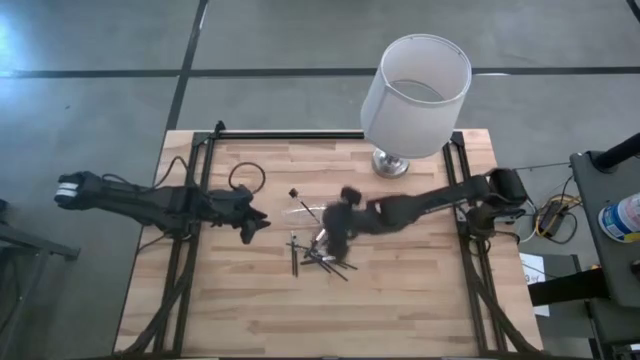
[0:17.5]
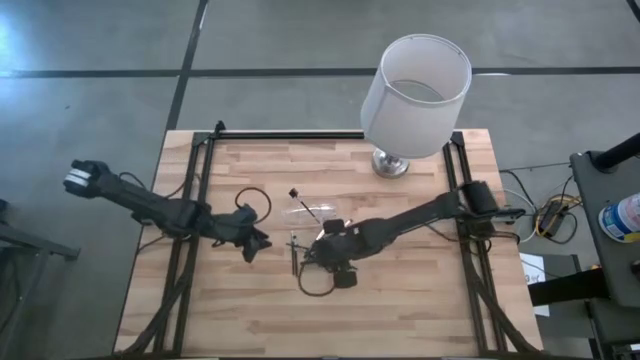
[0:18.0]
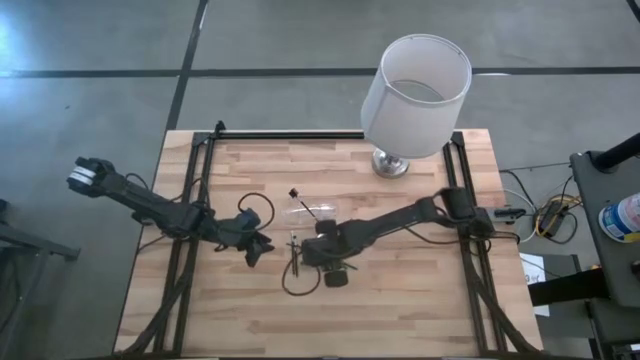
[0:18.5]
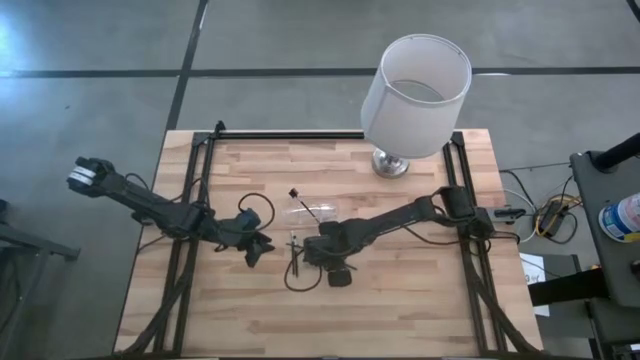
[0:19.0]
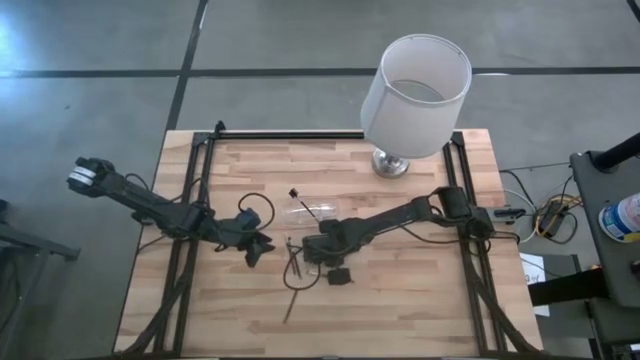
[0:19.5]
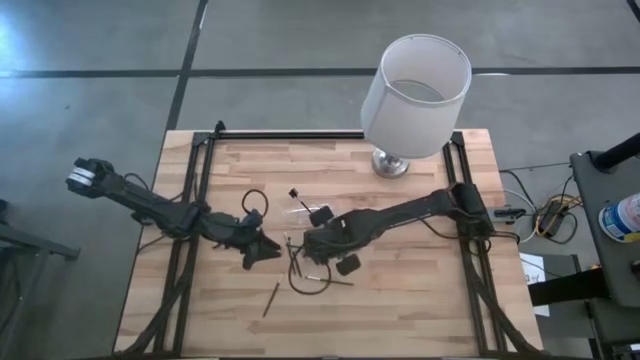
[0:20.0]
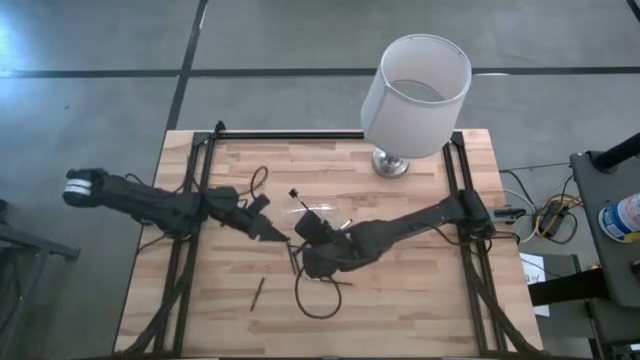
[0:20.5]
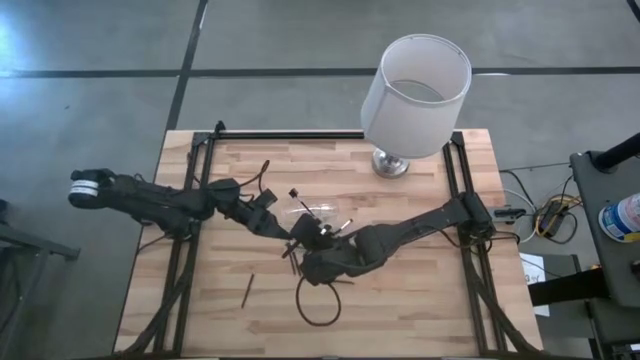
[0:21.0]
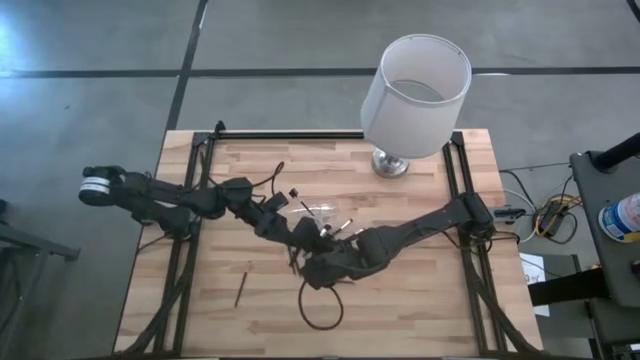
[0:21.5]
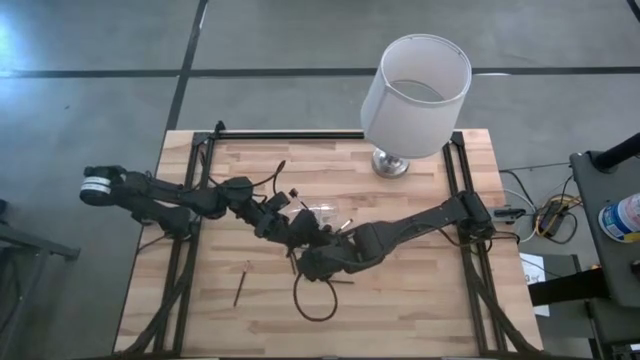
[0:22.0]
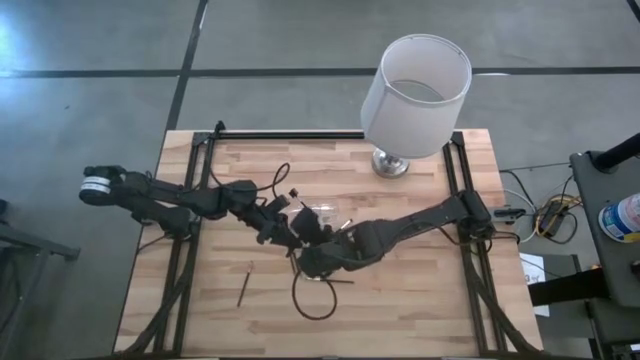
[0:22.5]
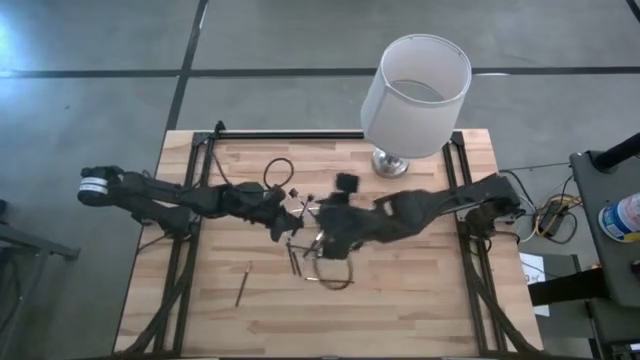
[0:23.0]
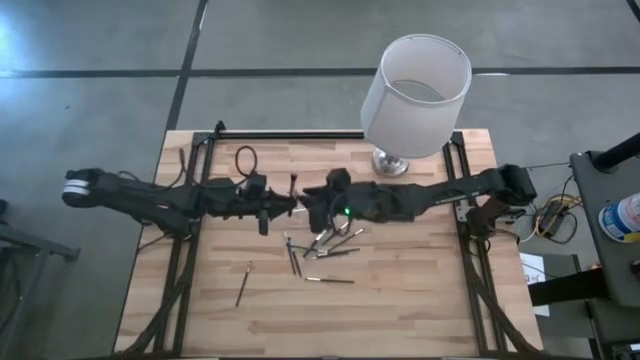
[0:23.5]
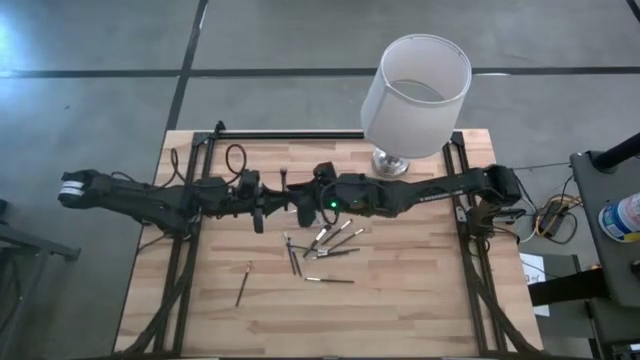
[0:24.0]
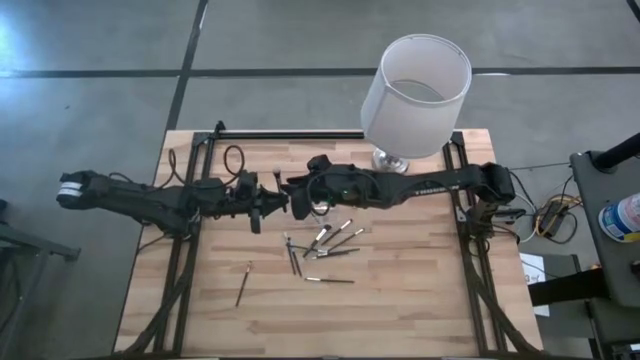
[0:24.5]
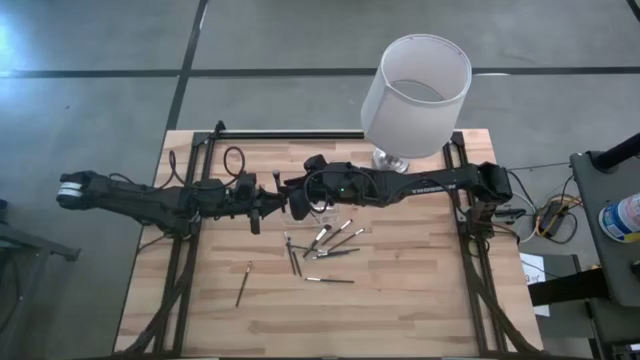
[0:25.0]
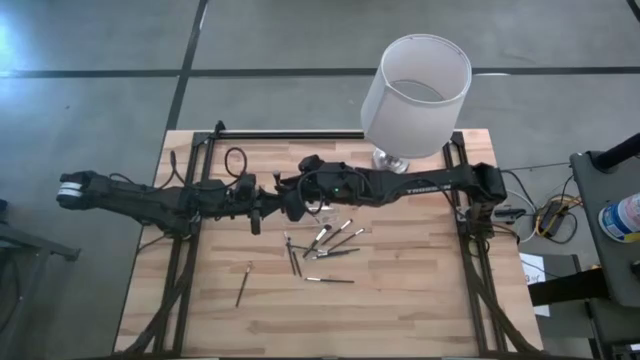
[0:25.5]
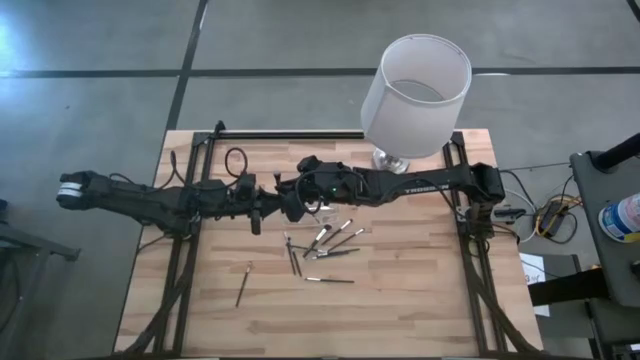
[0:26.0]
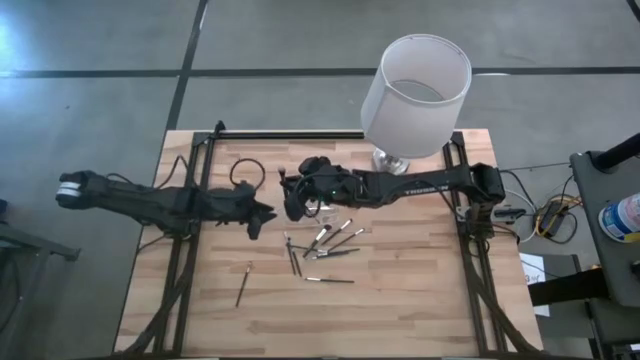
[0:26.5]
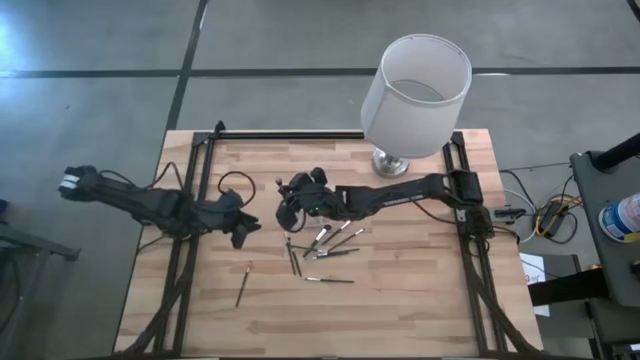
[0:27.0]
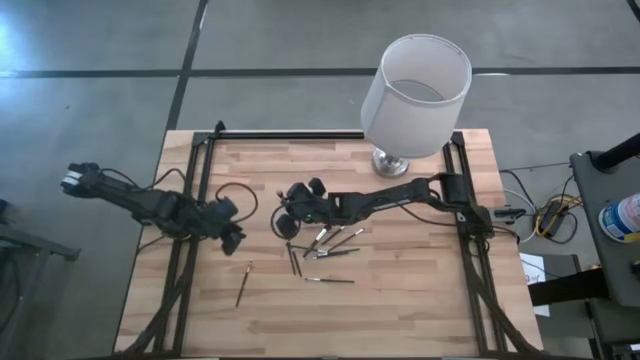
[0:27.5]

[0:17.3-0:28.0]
Task: Put items in baskets/containers
Put the foundation brush into the transparent organizer

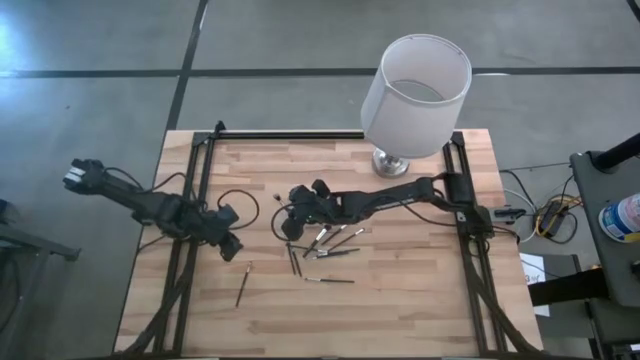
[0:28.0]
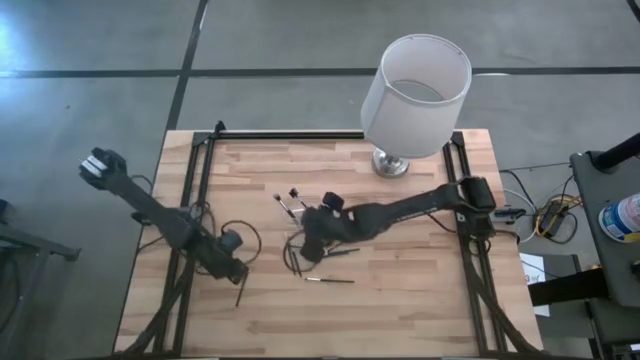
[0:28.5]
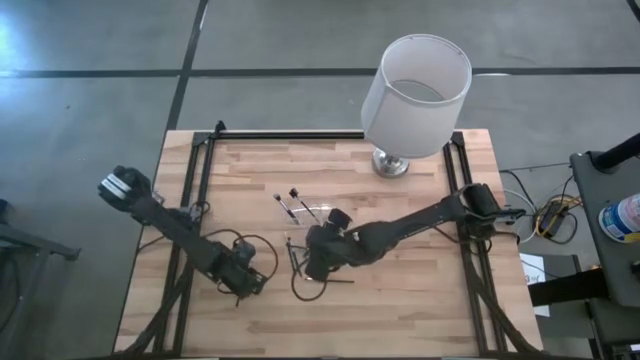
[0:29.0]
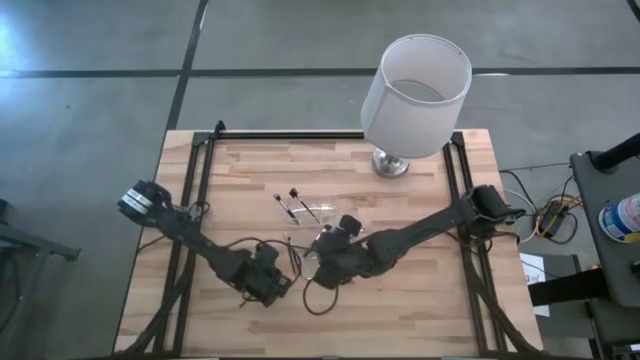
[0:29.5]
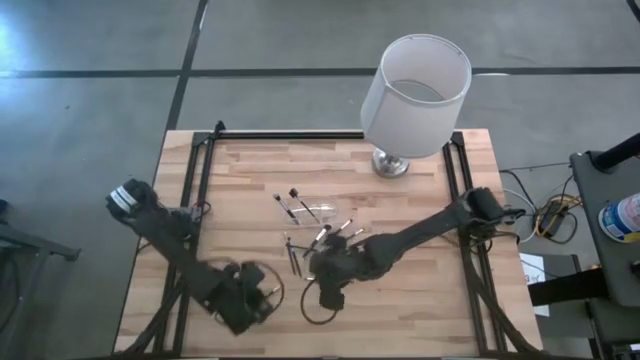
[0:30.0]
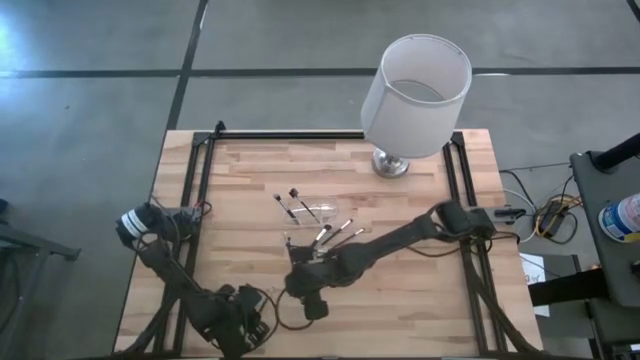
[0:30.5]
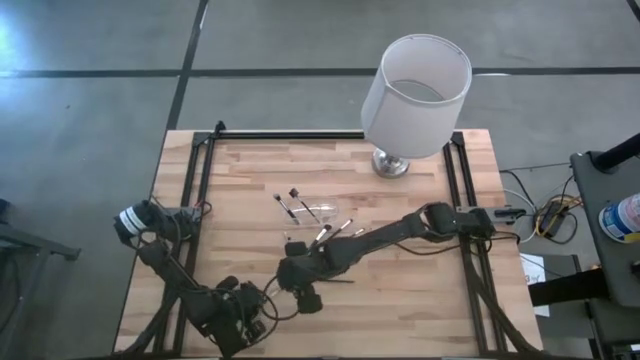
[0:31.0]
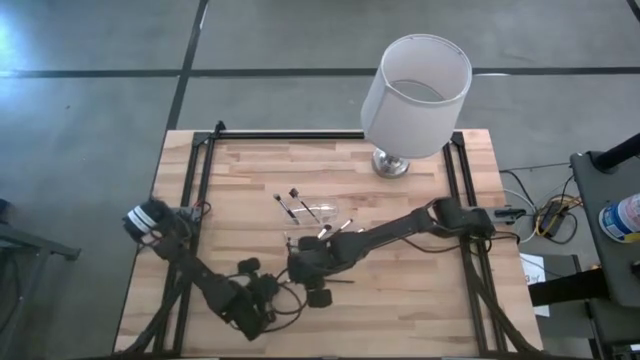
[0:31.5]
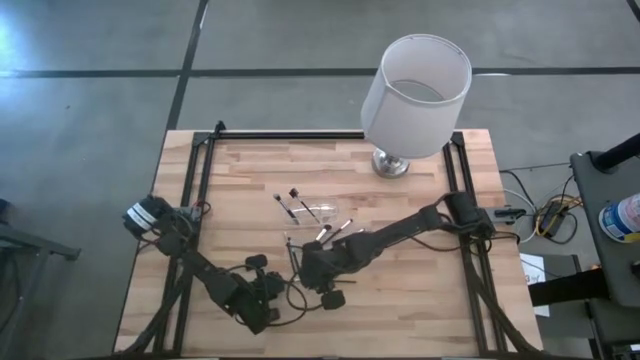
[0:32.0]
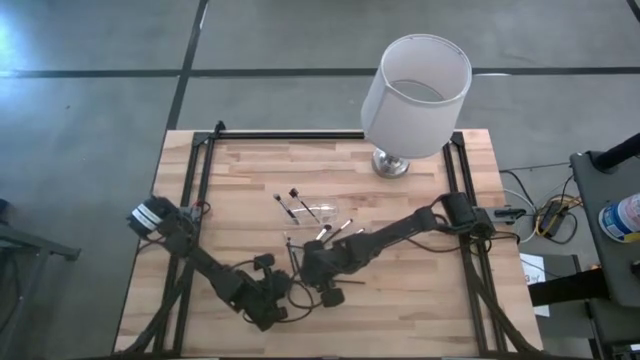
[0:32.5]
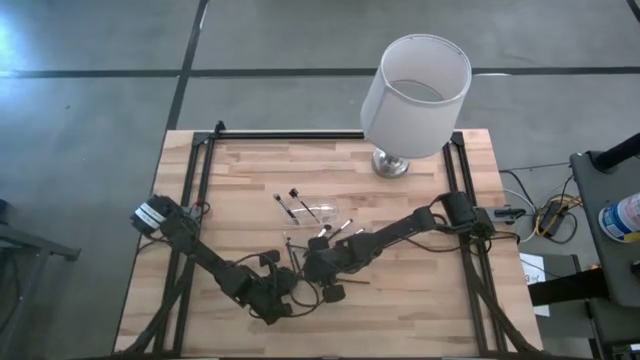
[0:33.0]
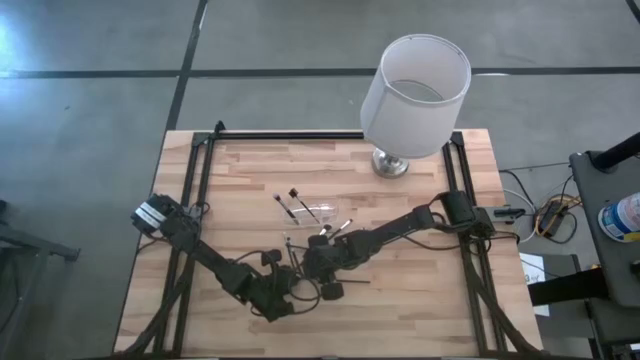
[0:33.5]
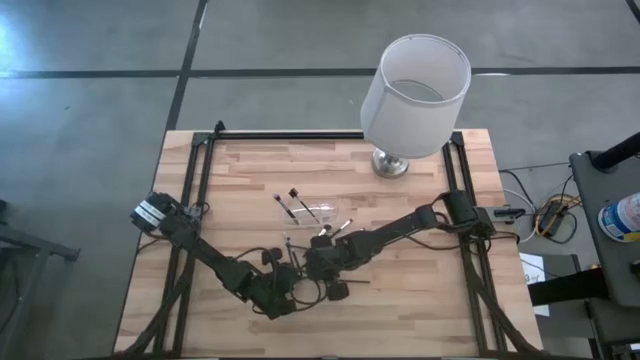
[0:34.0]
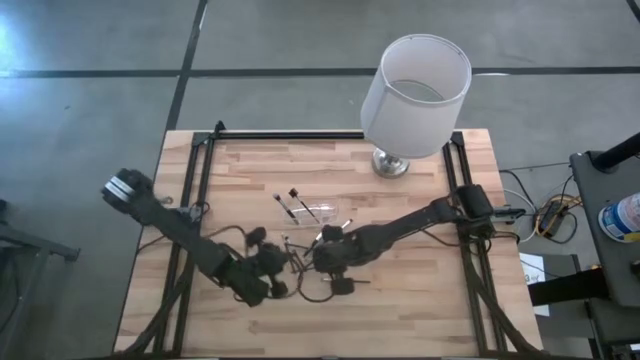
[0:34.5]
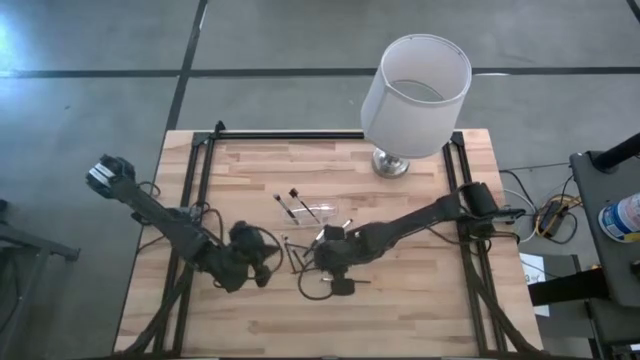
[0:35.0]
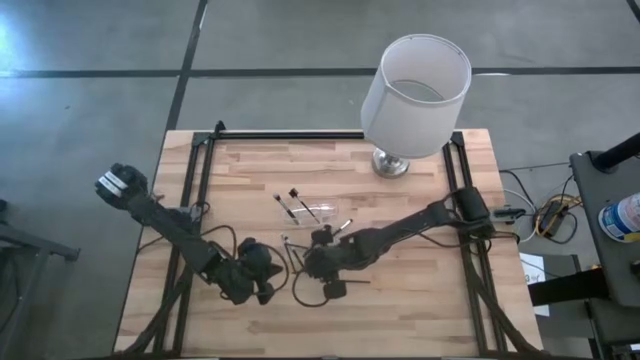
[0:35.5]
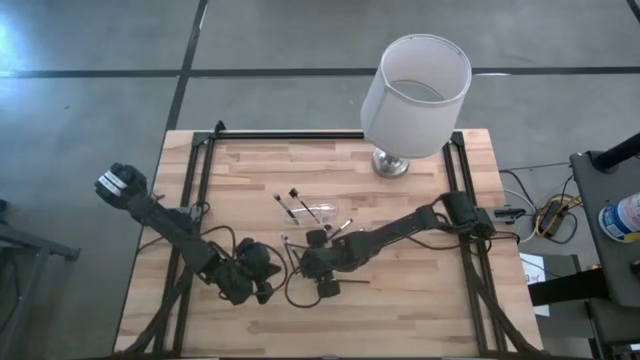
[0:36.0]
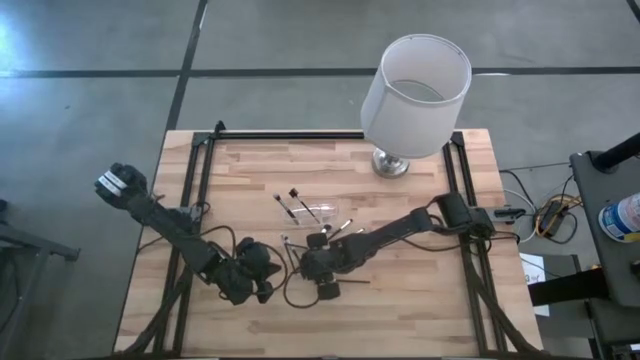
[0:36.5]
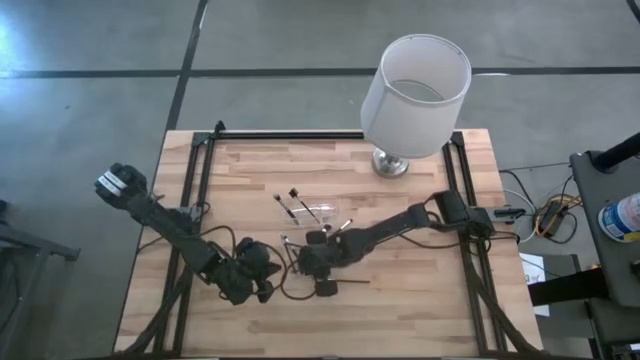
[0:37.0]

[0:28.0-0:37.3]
Put the eyeshadow brush into the transparent organizer

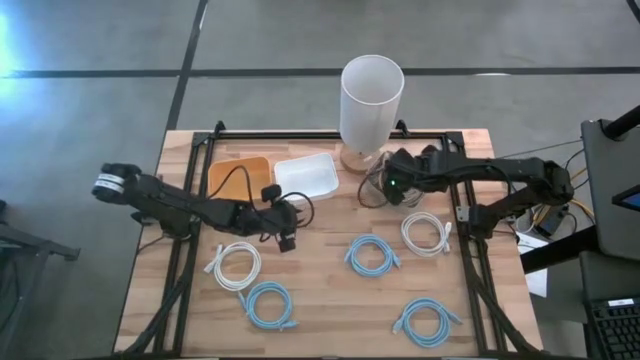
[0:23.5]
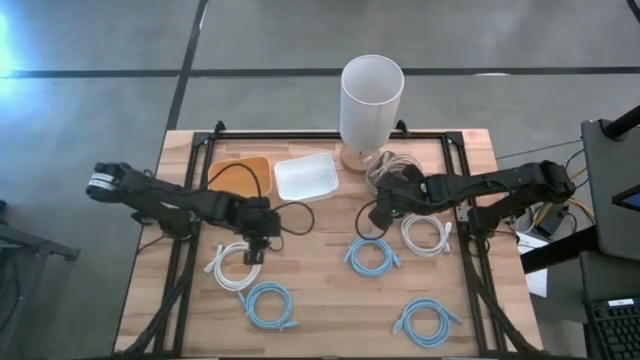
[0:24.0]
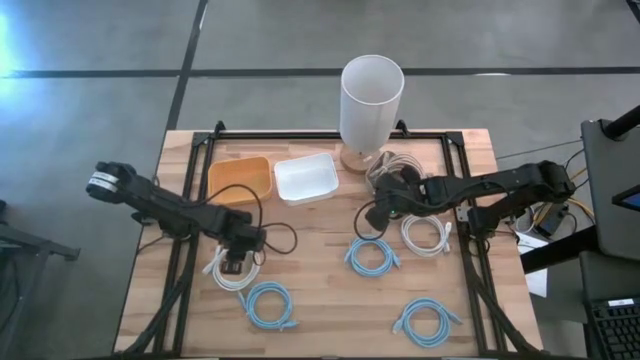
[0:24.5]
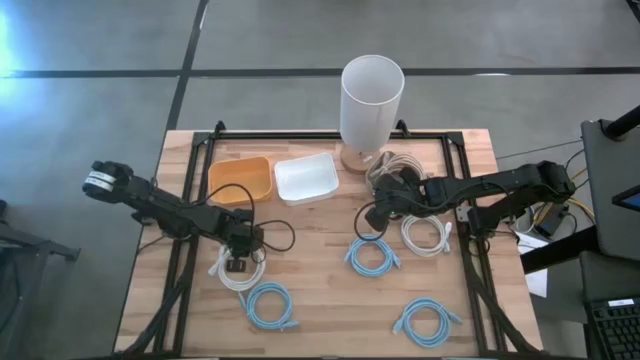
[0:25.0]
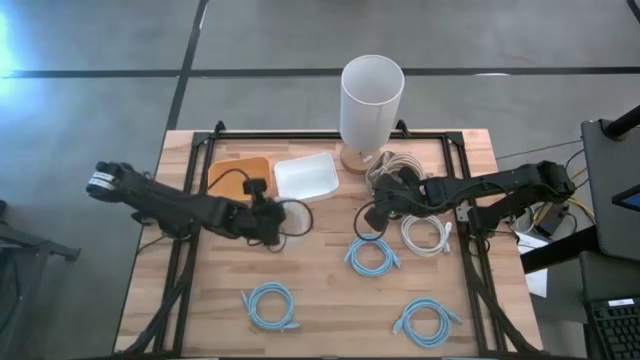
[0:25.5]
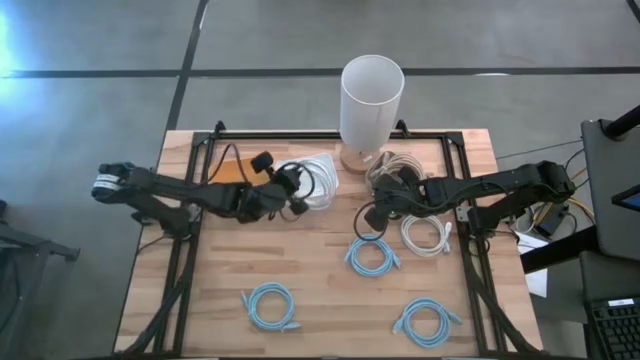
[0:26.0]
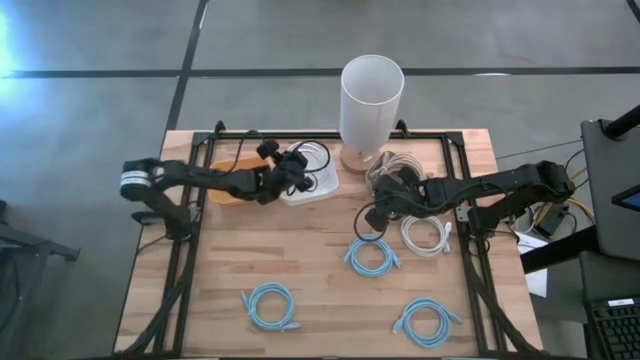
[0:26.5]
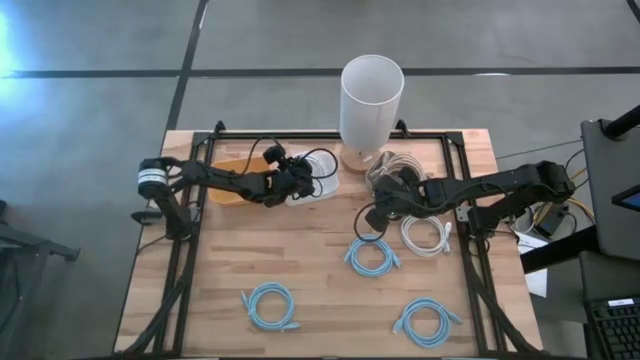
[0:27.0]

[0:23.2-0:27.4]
Task: Pick & Place USB Port
Put the left white USB cable into the white bin
